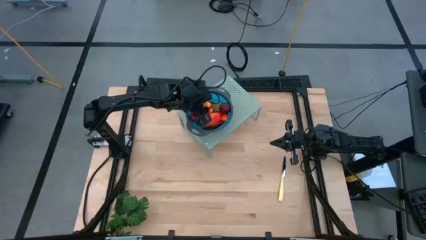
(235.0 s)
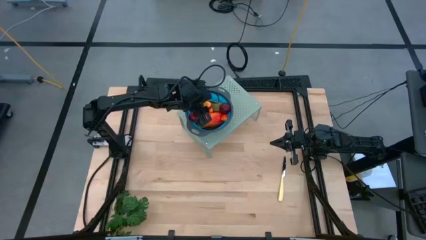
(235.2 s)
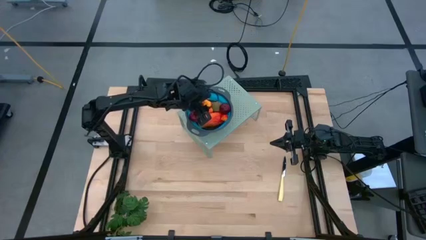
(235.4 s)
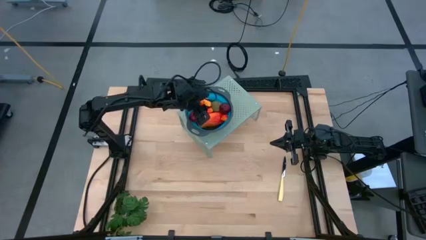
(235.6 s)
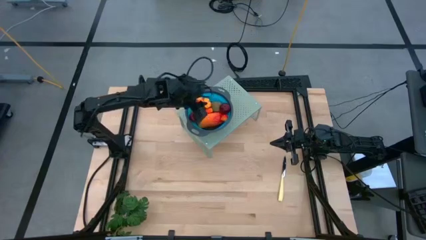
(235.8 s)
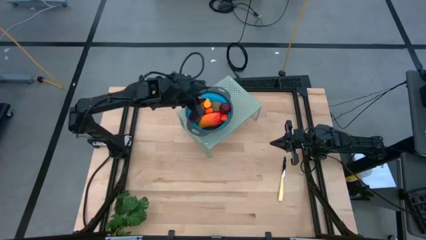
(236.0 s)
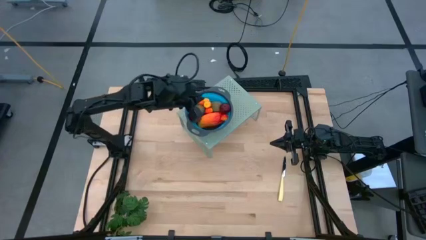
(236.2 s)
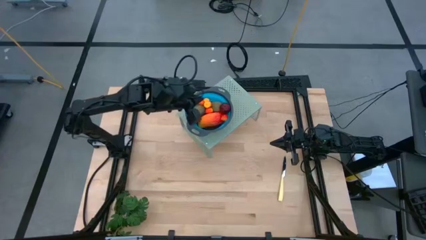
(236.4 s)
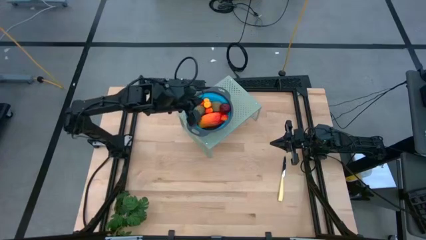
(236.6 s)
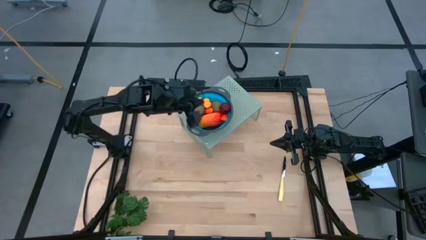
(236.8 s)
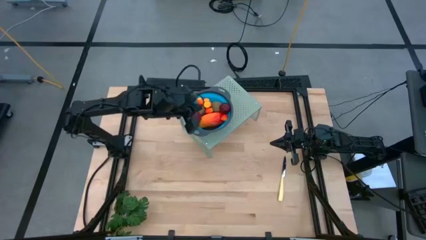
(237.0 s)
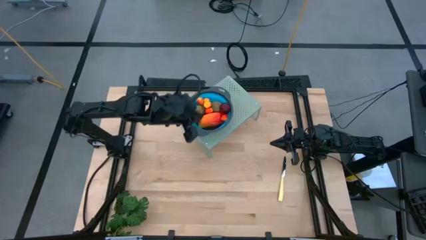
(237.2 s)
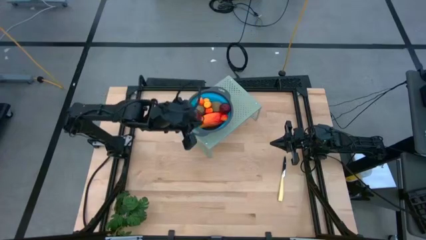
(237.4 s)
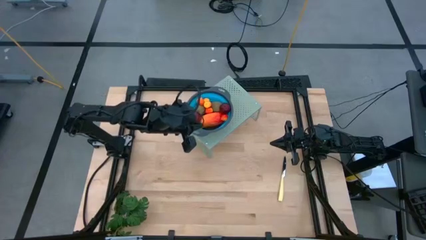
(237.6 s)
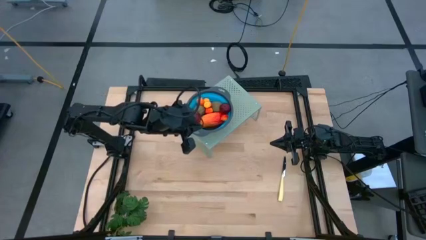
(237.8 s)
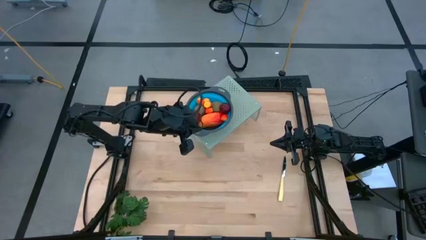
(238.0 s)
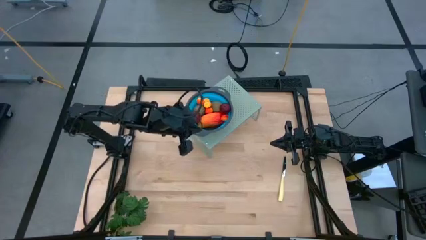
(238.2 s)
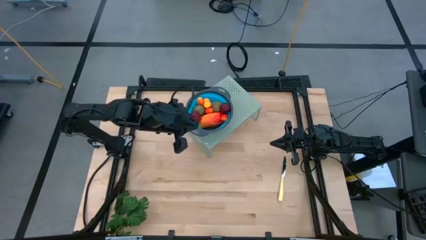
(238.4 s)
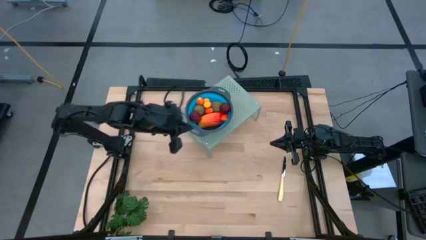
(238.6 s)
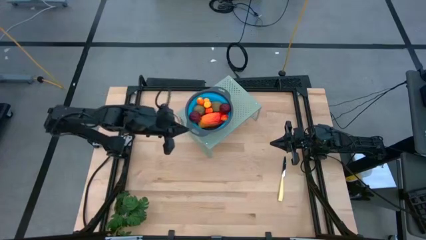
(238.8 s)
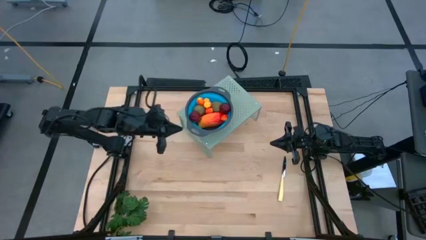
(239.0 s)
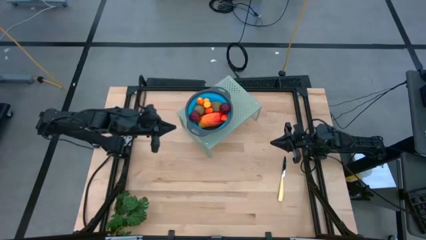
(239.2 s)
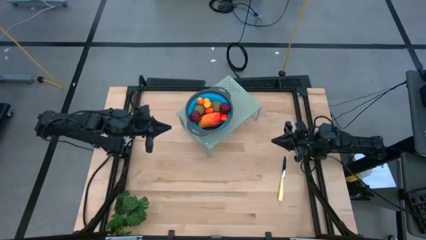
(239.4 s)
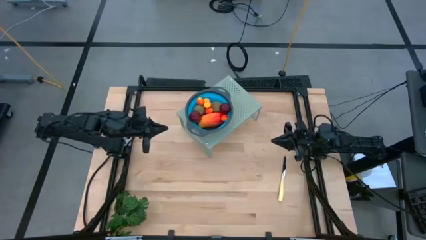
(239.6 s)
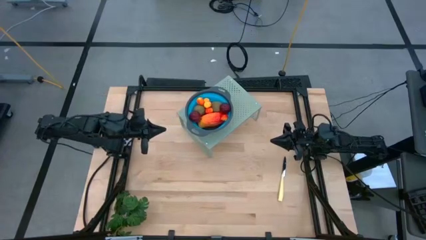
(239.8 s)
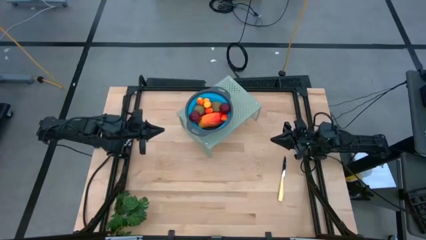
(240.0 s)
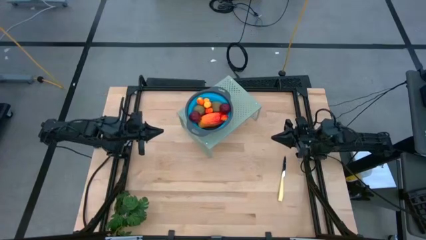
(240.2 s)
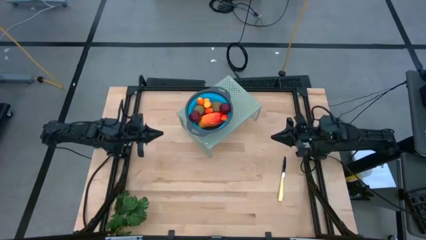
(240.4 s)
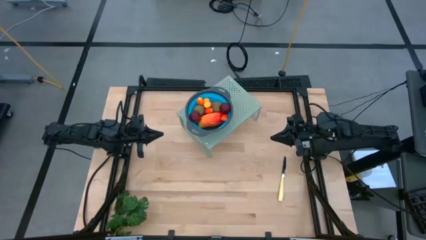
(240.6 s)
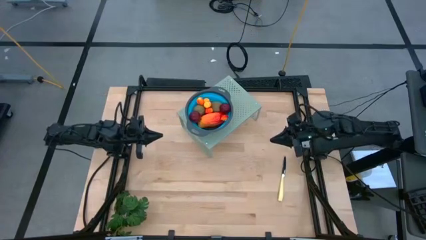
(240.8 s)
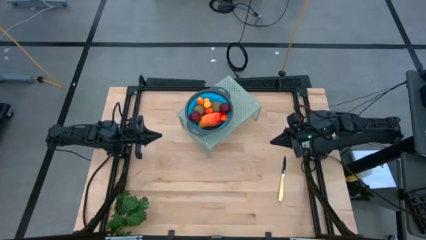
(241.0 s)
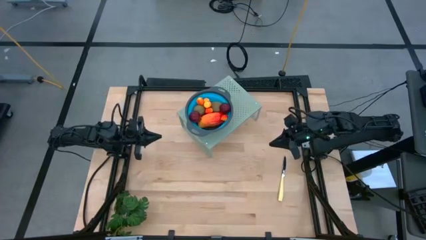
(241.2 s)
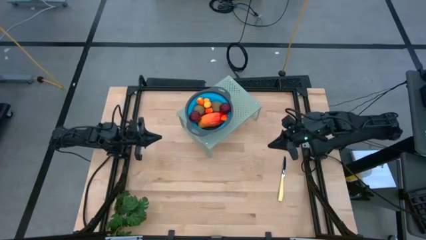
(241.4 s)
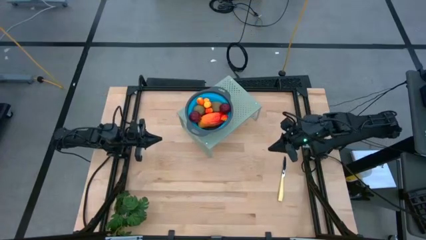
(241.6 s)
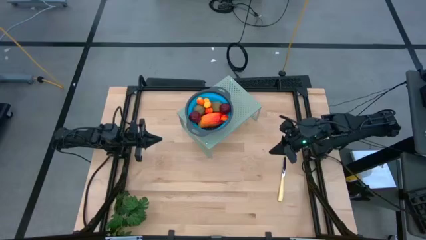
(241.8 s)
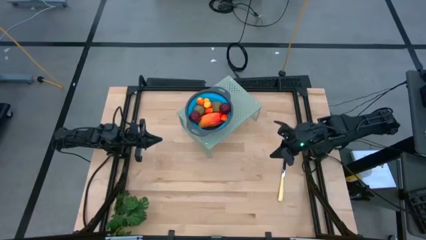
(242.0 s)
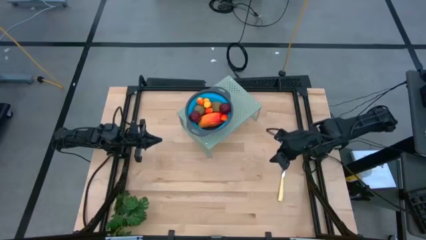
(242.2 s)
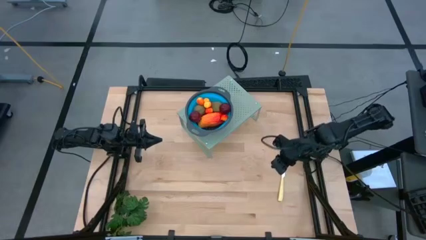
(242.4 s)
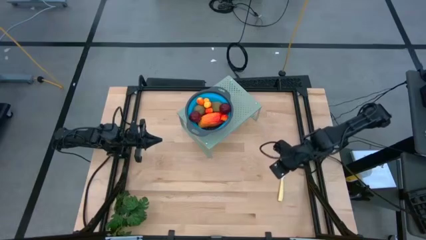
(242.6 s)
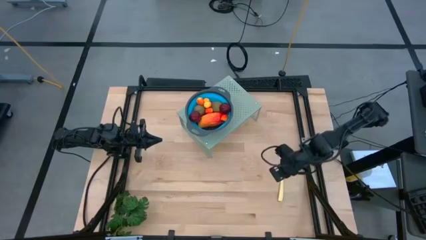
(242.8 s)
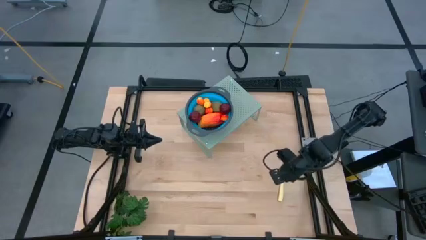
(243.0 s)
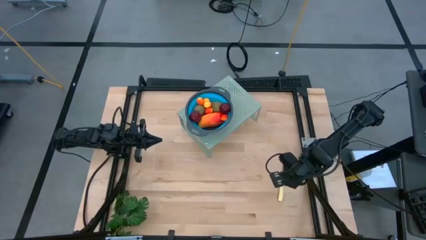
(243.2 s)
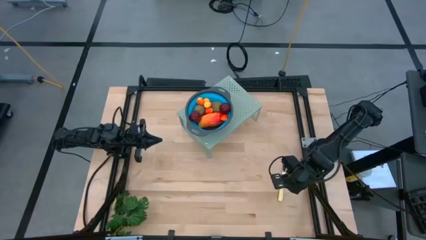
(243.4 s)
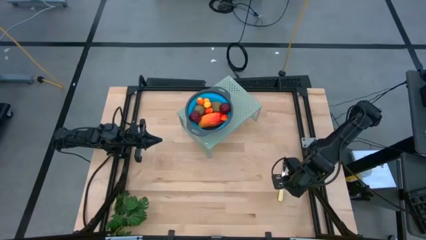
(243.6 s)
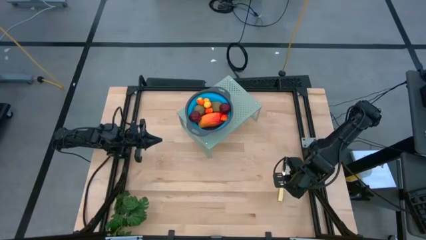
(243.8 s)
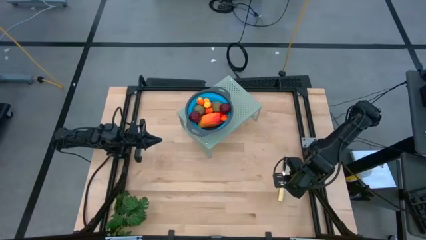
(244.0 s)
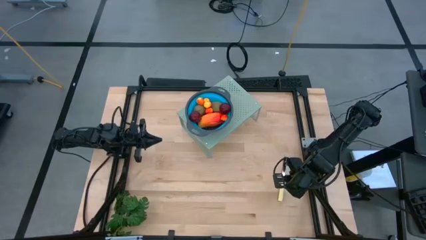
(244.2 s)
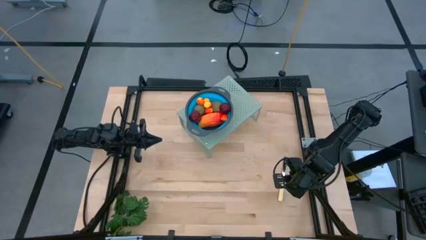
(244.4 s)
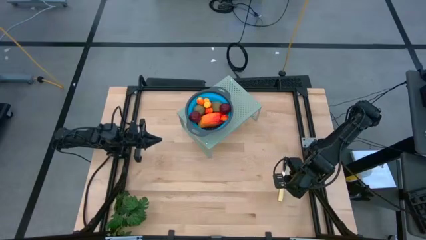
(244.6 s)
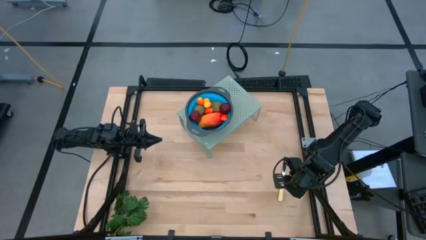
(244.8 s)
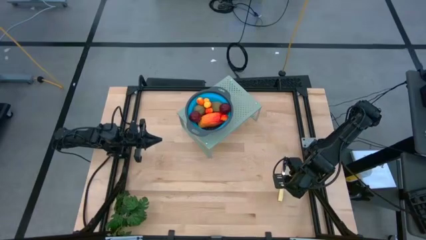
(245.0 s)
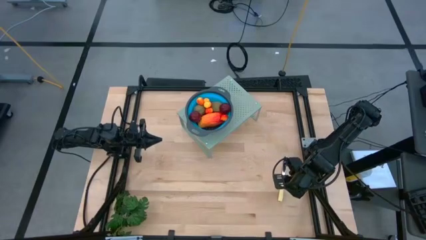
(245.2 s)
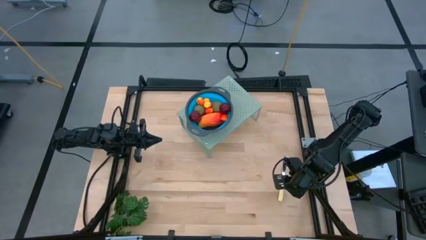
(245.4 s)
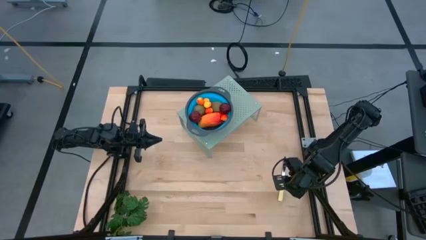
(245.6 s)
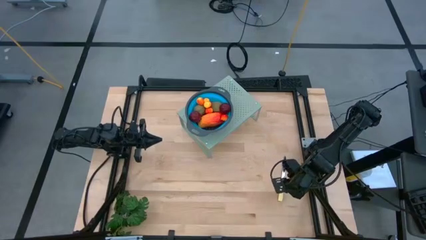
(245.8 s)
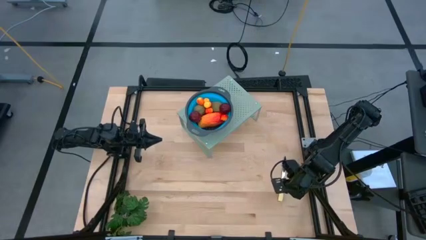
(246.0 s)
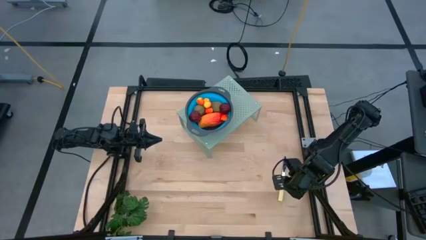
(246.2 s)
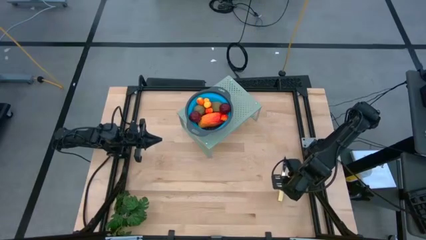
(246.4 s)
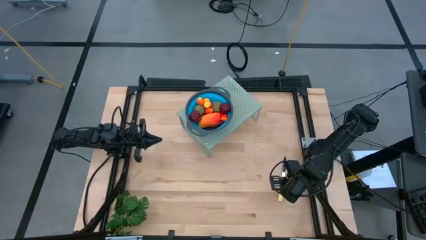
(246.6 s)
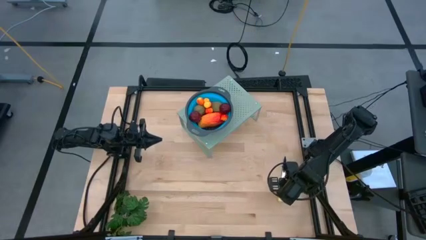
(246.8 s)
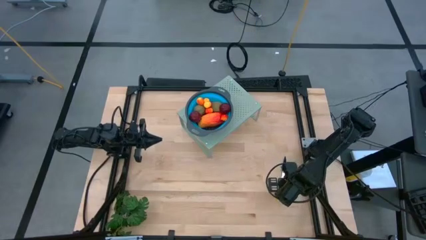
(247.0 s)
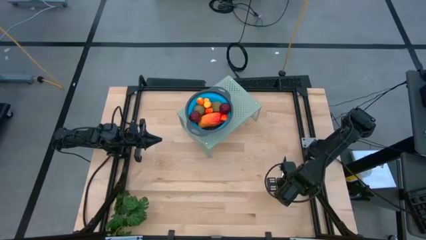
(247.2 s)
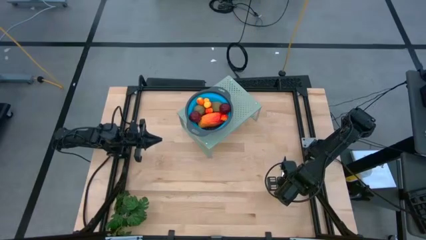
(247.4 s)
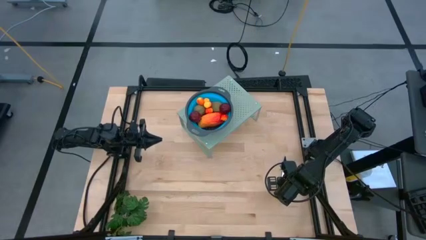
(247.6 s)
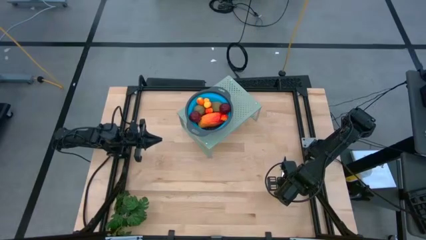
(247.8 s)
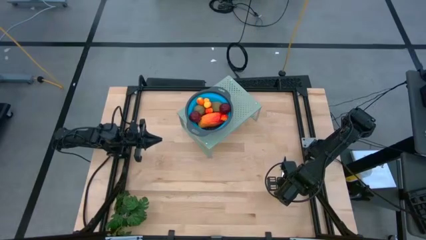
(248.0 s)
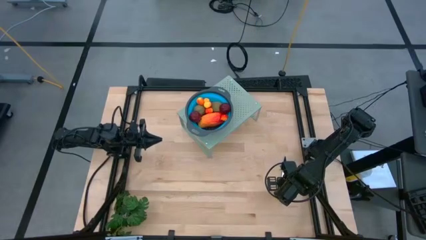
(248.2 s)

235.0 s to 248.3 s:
Task: Pick & Place Fruit
Put the yellow table knife on the shelf to the right of the blue strainer bowl
